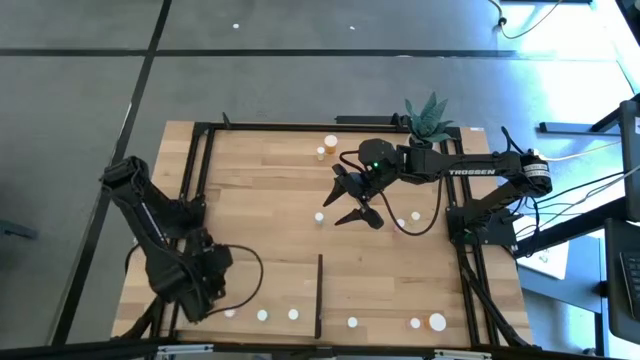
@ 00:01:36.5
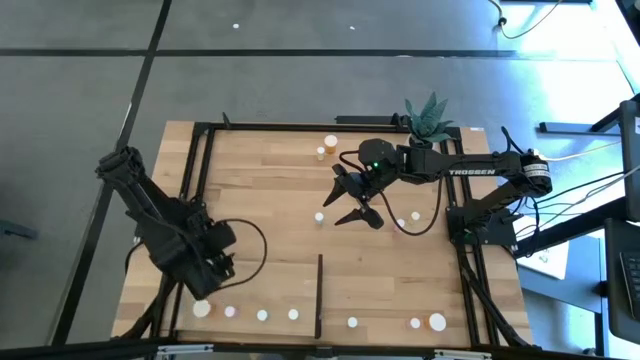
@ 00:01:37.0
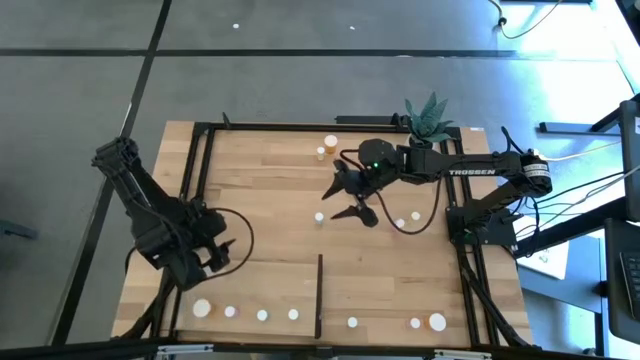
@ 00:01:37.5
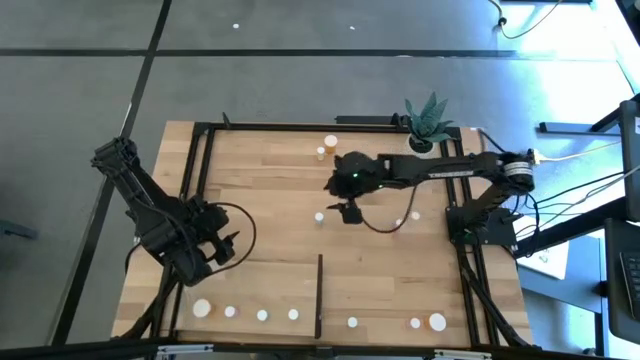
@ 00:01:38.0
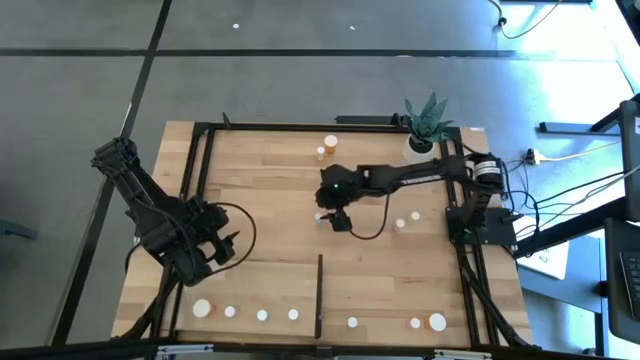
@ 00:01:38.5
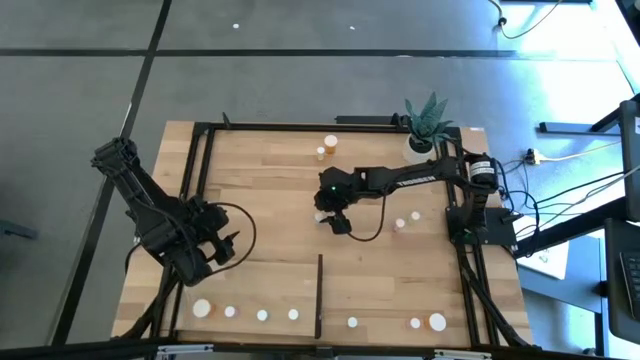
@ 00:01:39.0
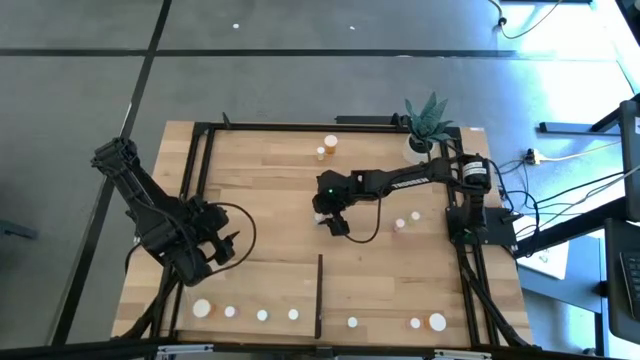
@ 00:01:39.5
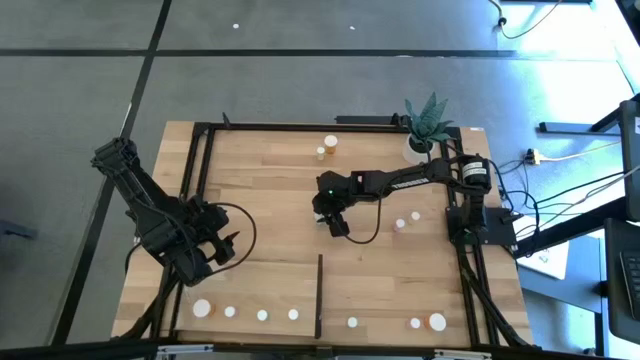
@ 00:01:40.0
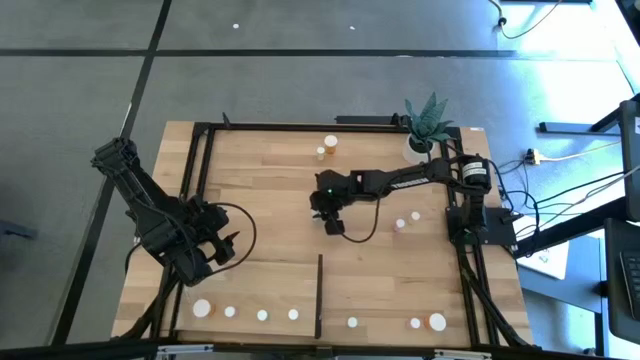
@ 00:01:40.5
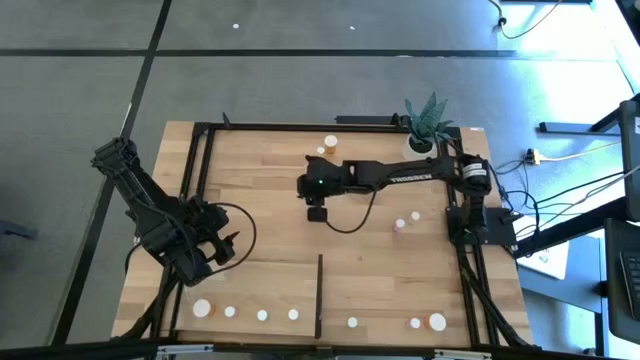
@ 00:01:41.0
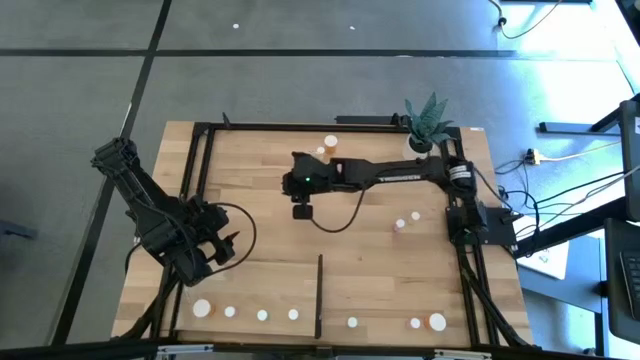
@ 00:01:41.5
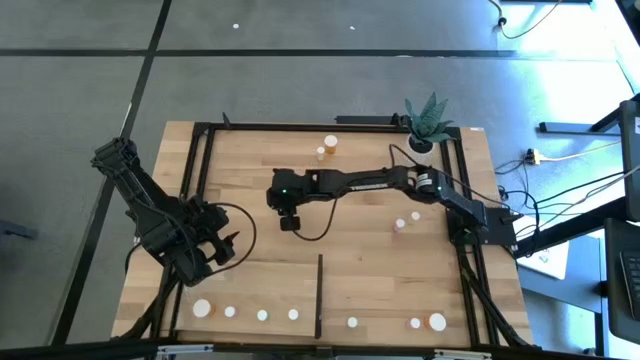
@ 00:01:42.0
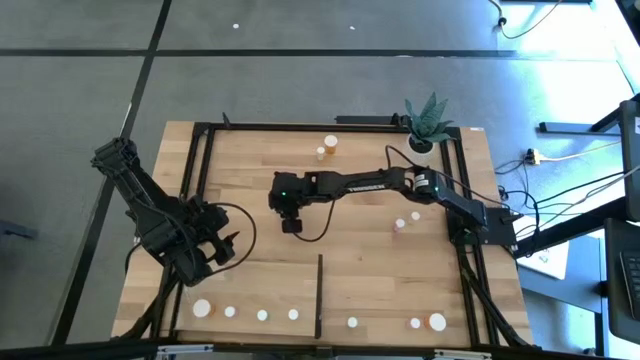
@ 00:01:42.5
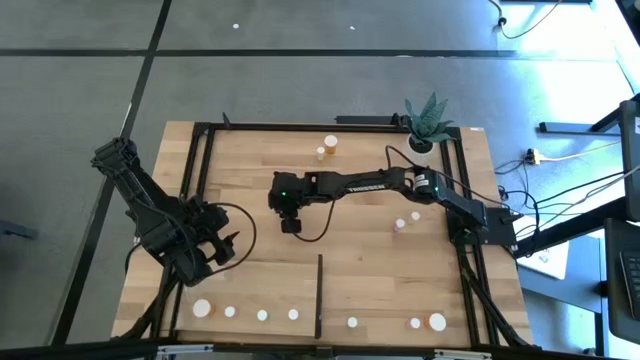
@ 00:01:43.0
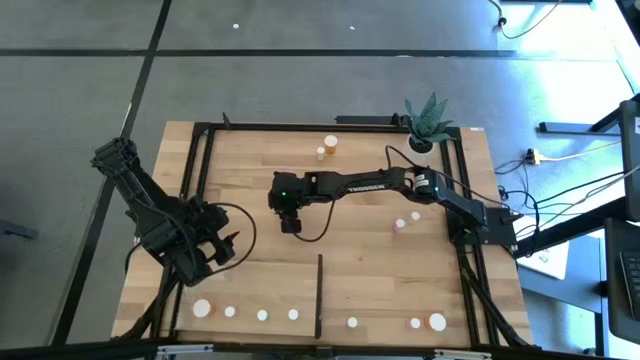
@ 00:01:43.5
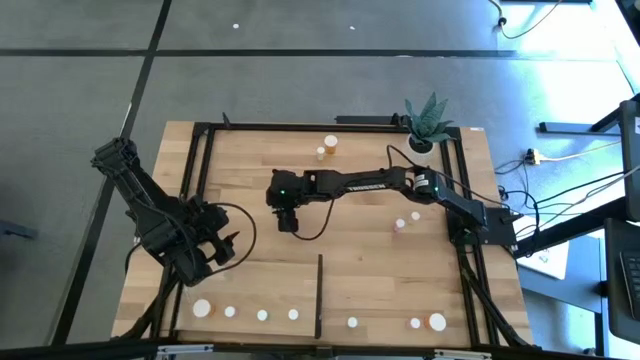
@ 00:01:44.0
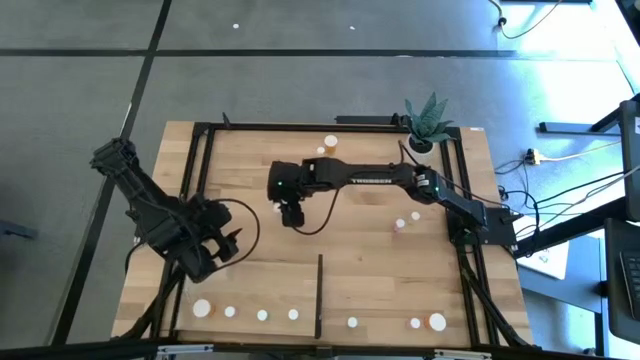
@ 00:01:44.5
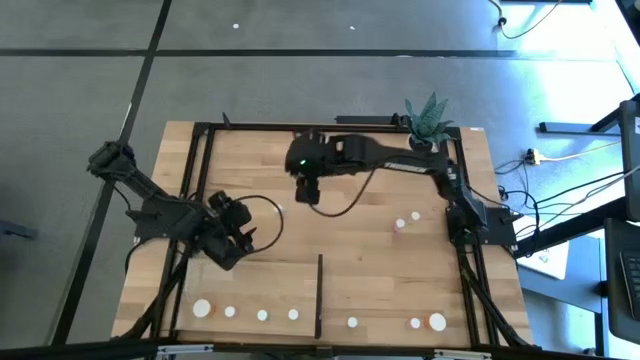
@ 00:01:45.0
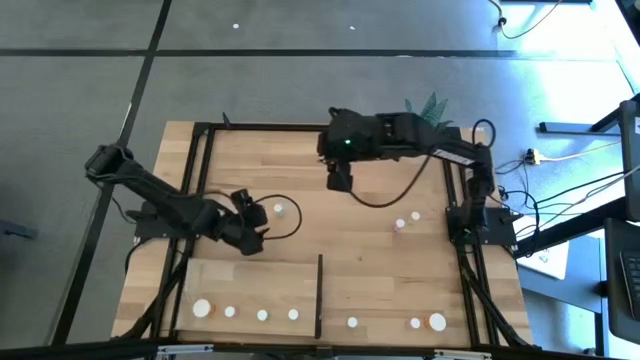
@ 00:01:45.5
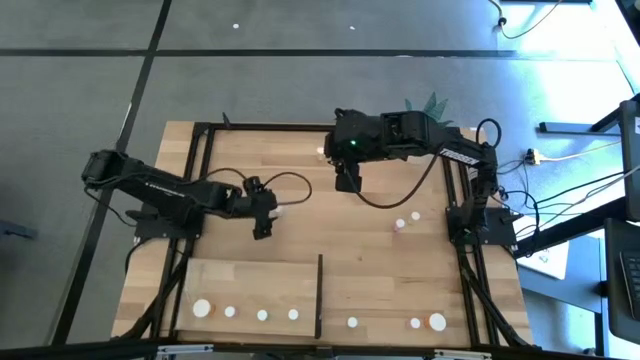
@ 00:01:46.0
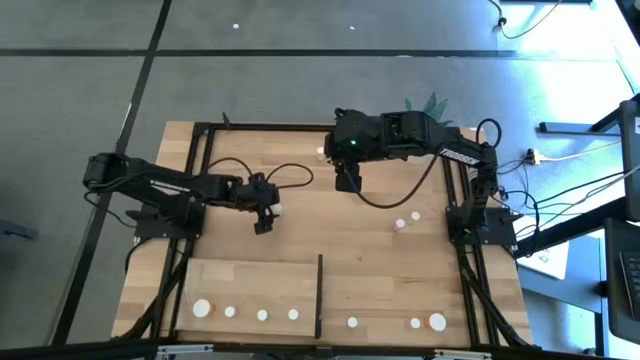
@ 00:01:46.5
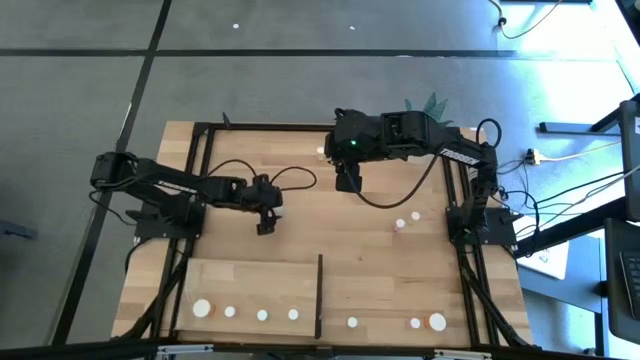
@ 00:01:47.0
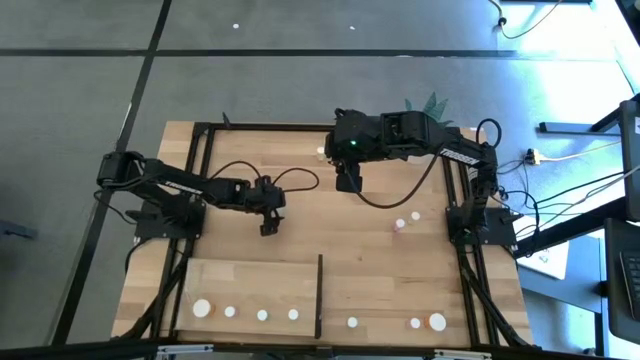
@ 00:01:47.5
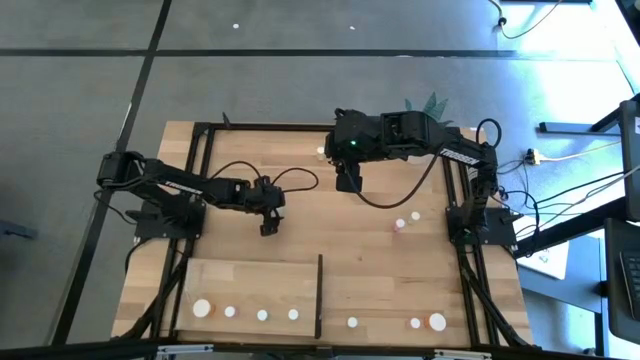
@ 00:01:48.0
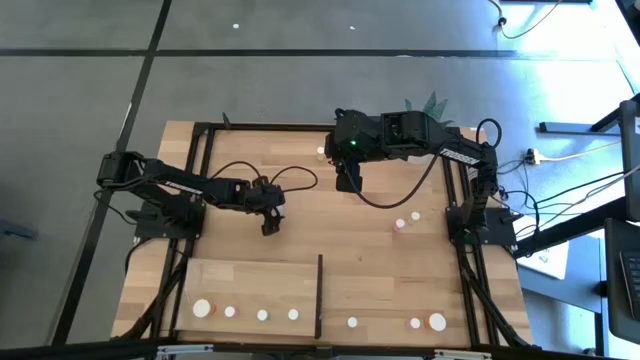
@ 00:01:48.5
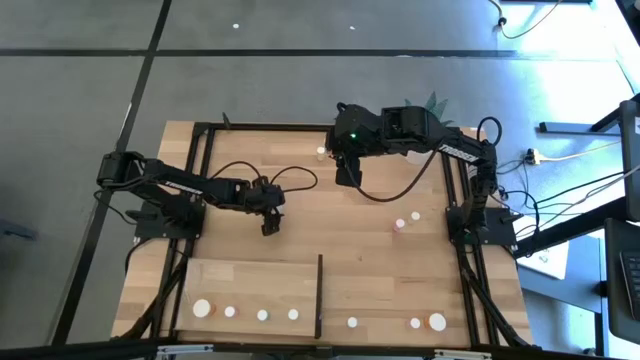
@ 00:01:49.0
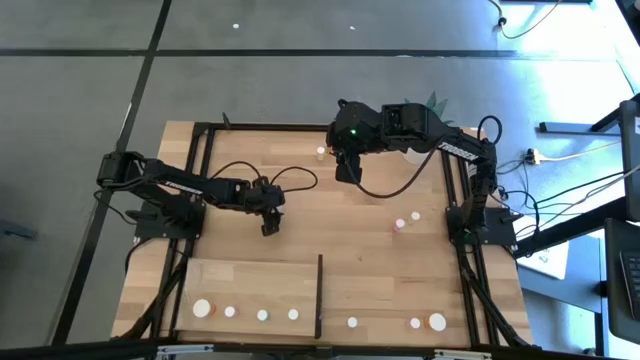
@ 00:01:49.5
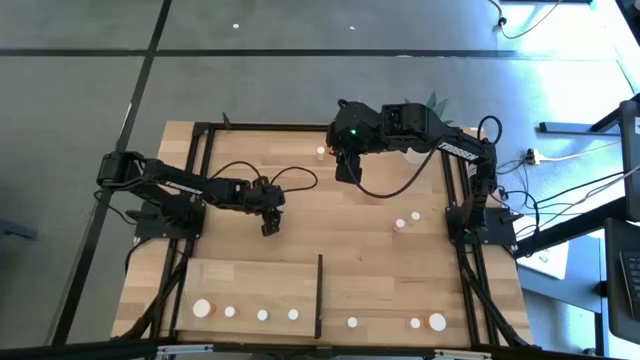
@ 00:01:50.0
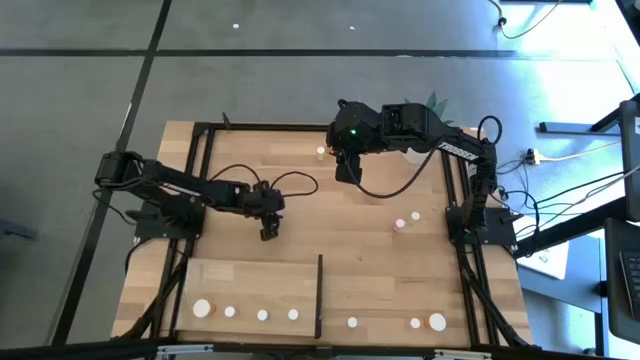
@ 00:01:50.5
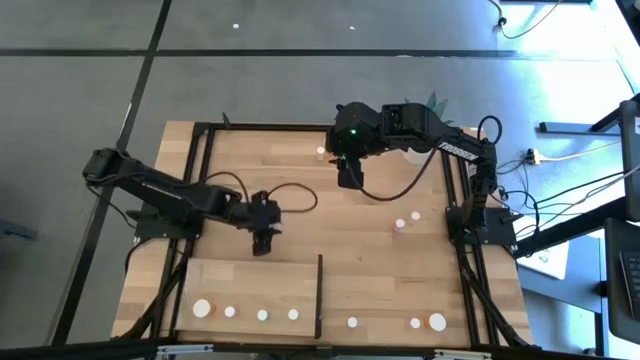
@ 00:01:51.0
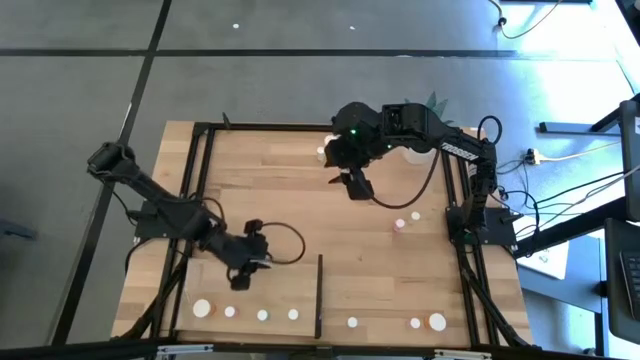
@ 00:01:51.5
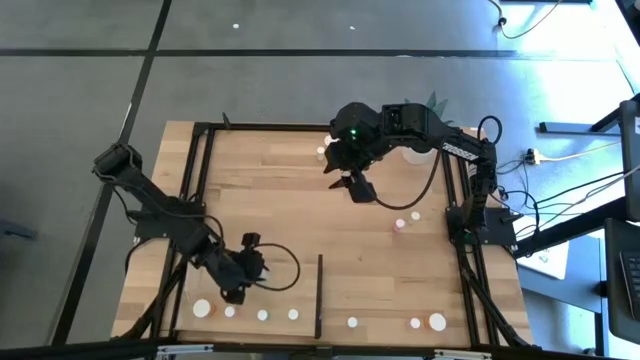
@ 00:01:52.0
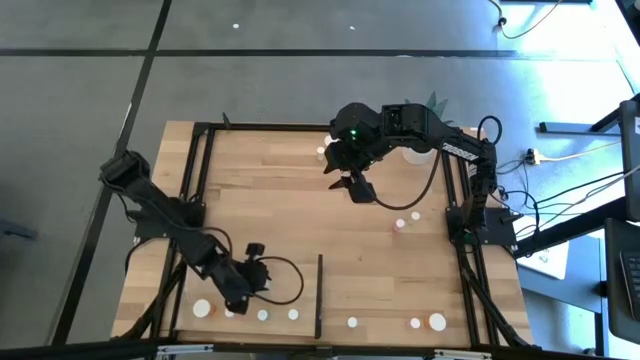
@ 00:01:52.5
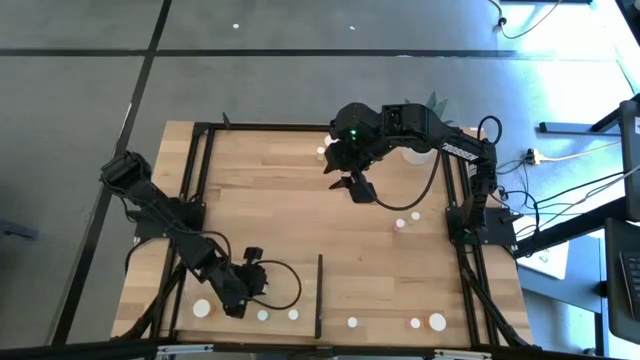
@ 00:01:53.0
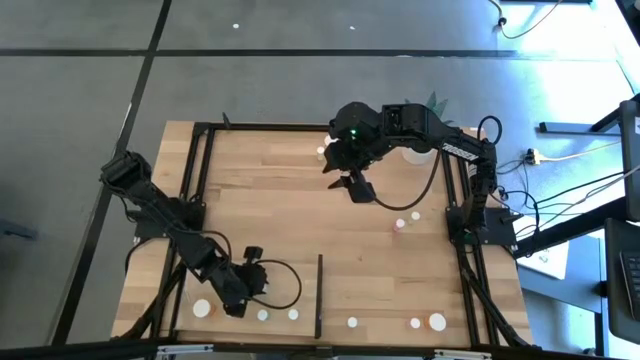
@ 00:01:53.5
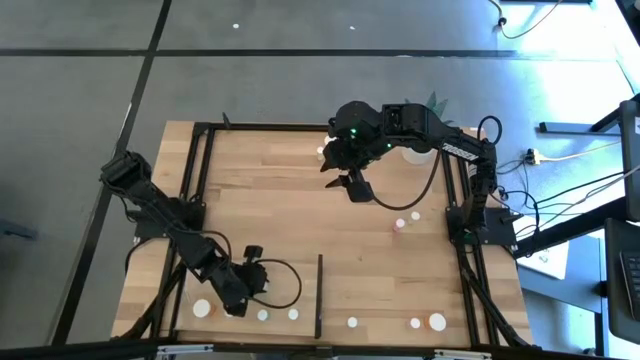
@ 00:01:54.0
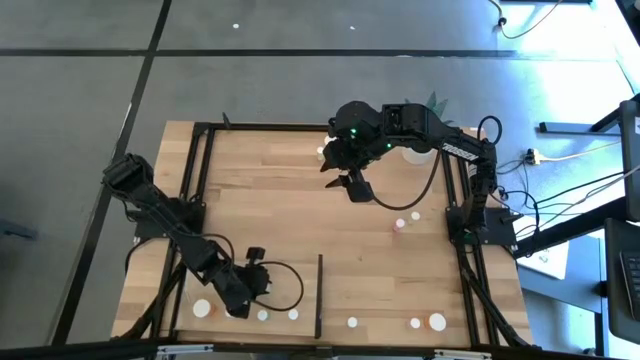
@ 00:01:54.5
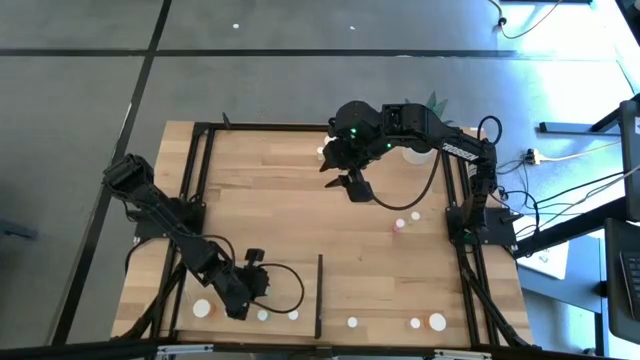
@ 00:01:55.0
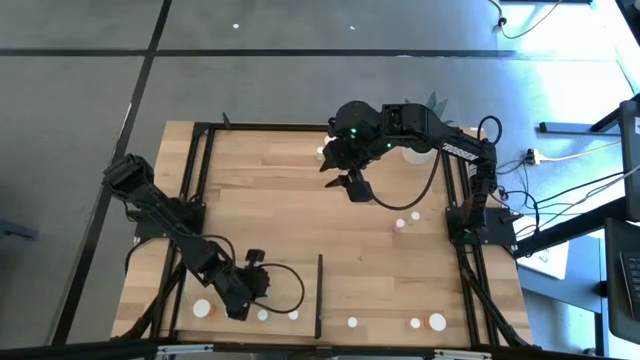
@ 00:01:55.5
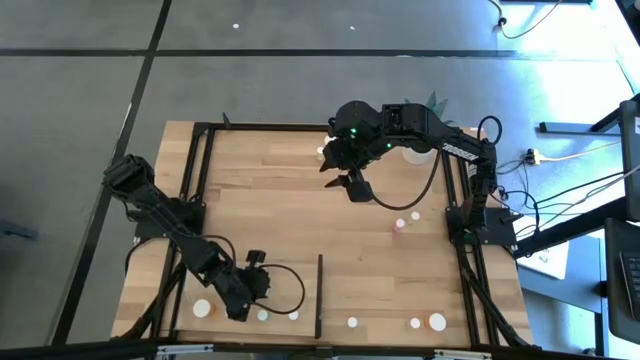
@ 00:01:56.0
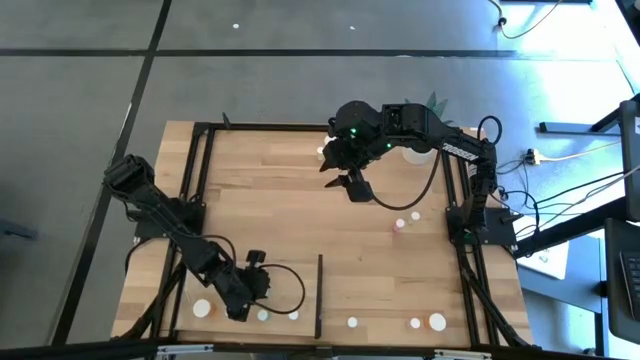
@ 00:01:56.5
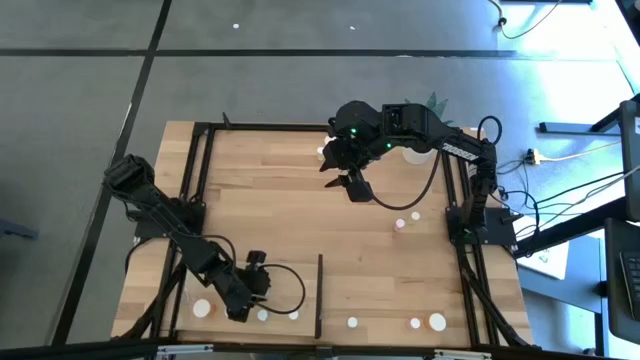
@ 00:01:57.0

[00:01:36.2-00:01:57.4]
Task: Pick and place medicine bottles onto shelf by color
Put the top blue pill bottle on the shelf aligned with the other blue pill bottle
